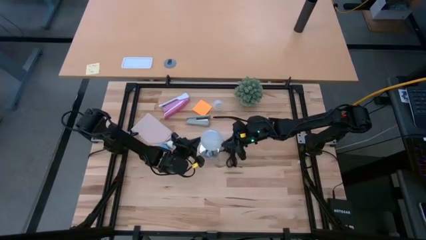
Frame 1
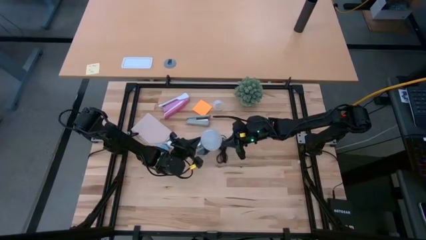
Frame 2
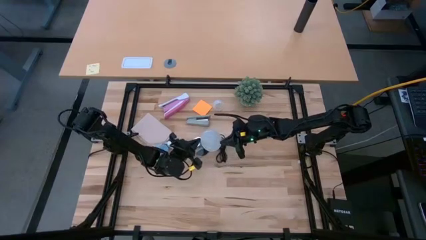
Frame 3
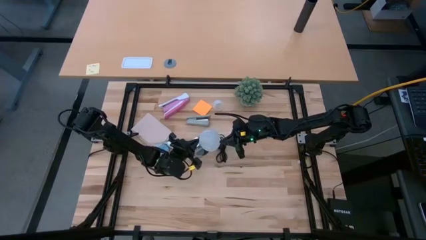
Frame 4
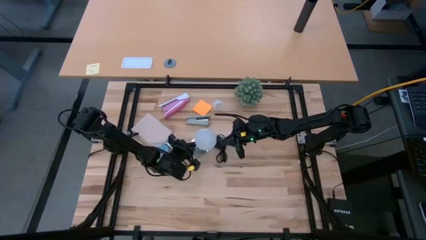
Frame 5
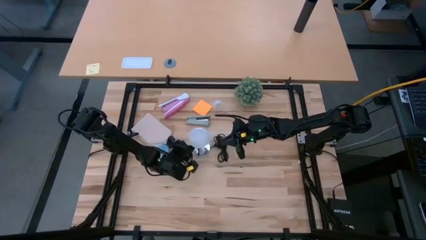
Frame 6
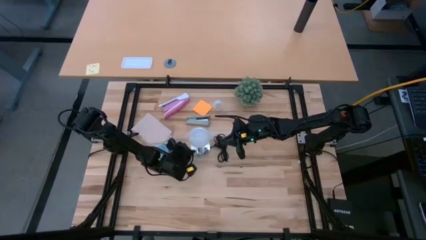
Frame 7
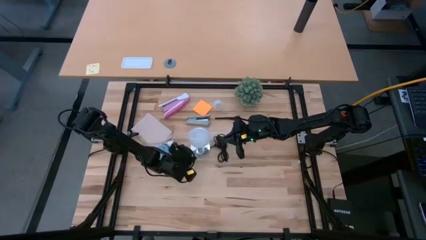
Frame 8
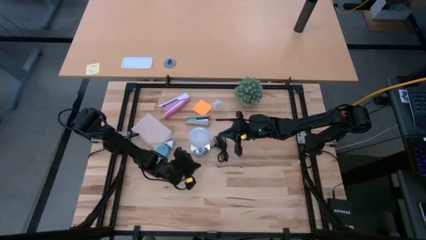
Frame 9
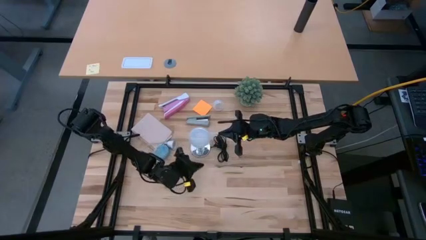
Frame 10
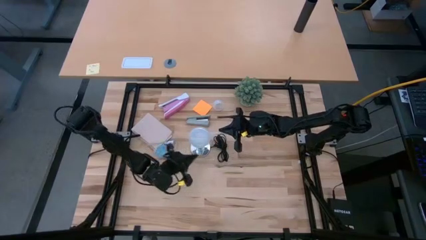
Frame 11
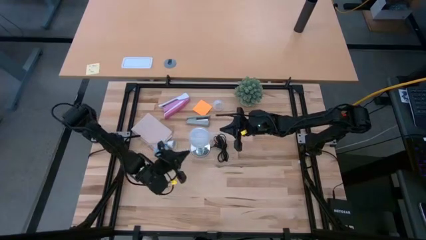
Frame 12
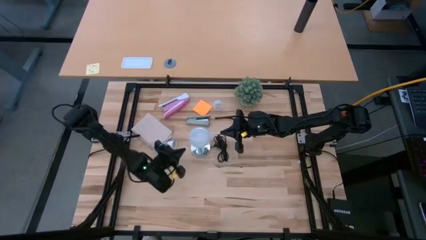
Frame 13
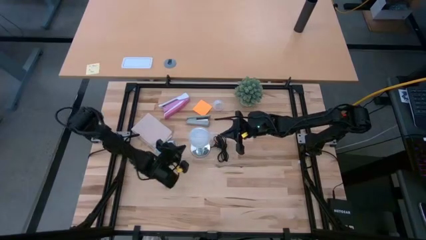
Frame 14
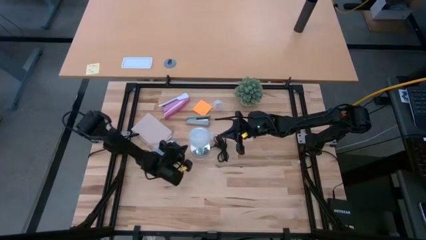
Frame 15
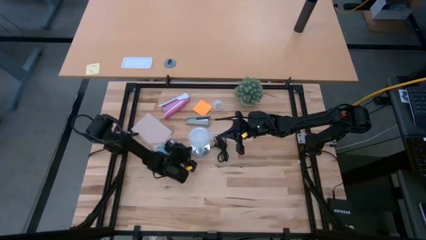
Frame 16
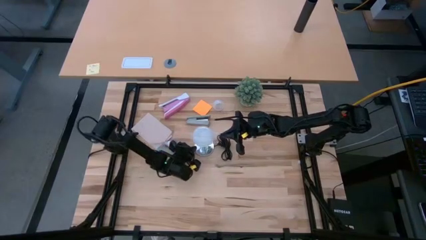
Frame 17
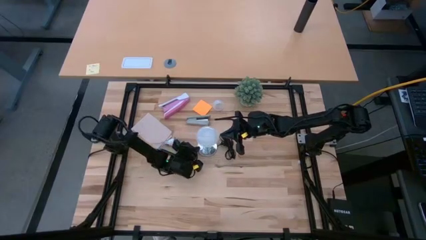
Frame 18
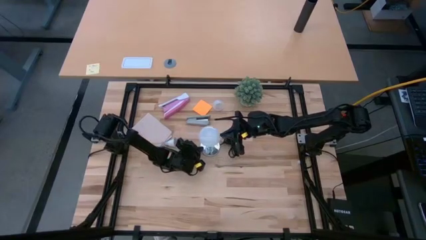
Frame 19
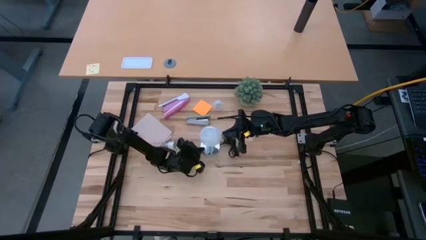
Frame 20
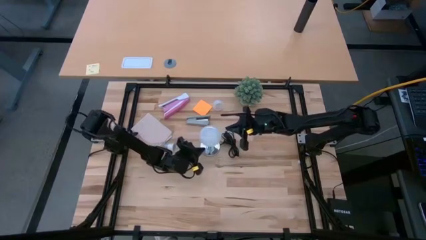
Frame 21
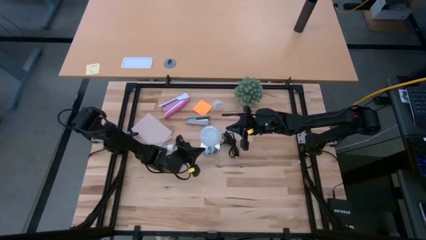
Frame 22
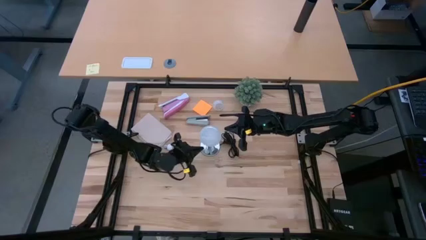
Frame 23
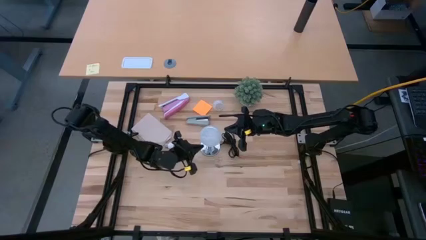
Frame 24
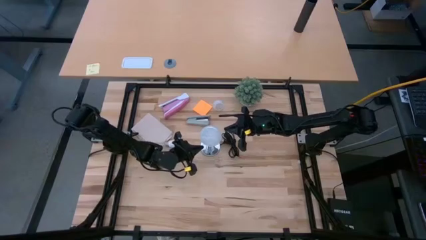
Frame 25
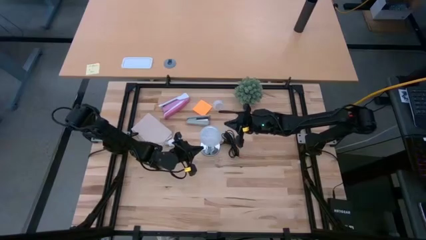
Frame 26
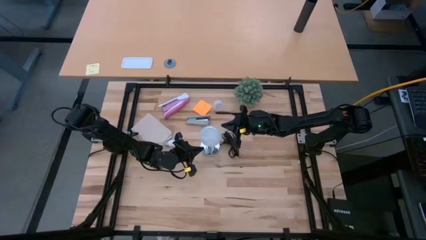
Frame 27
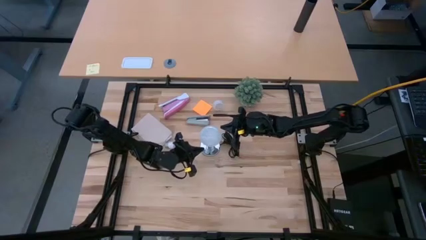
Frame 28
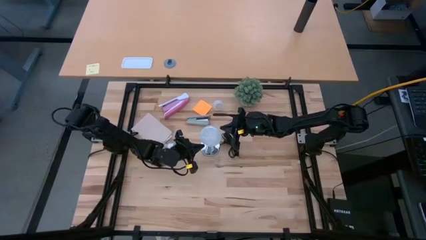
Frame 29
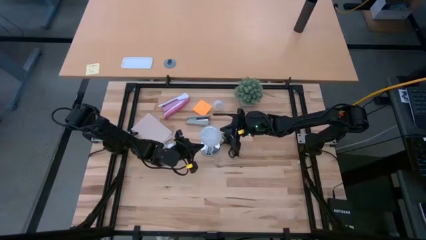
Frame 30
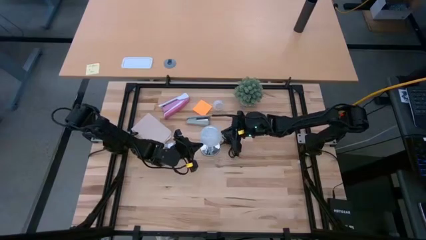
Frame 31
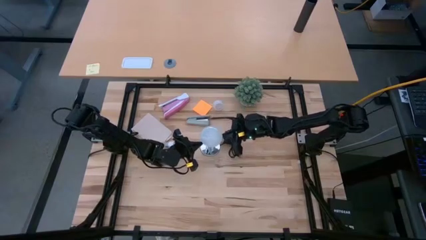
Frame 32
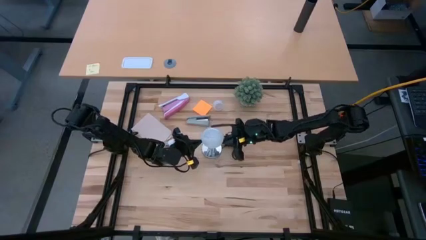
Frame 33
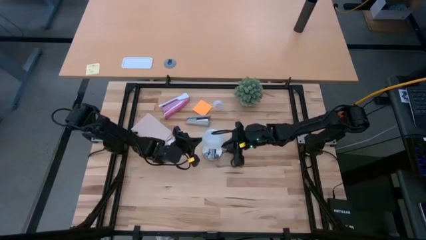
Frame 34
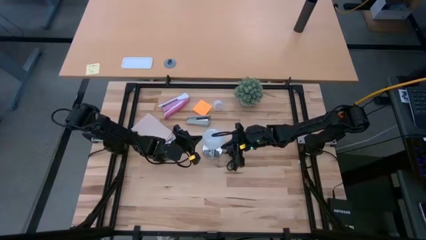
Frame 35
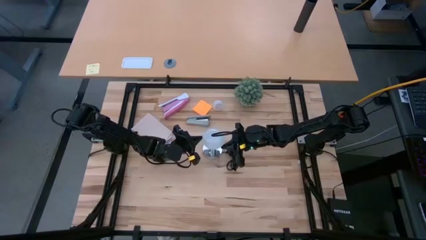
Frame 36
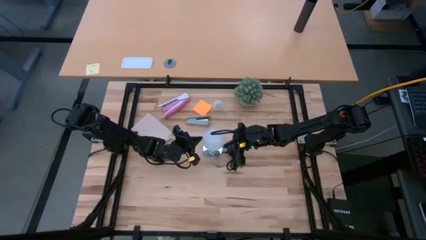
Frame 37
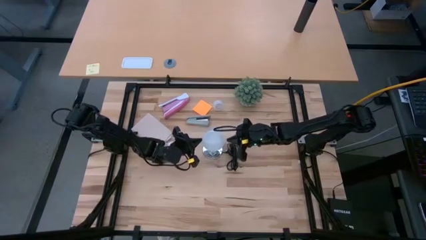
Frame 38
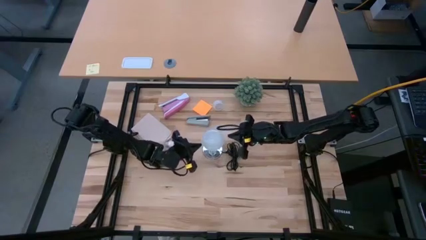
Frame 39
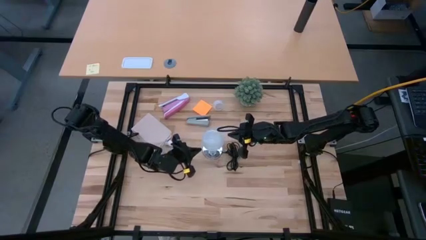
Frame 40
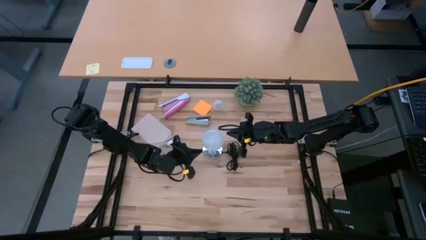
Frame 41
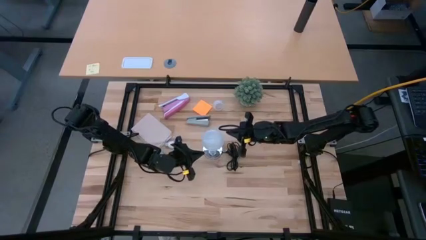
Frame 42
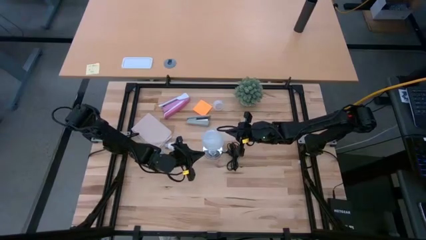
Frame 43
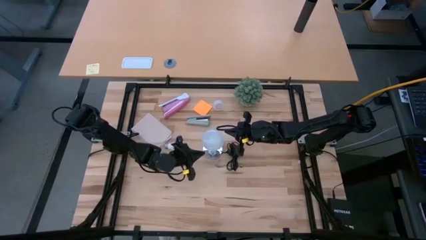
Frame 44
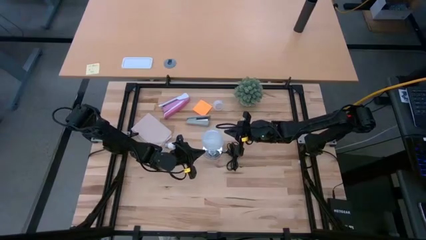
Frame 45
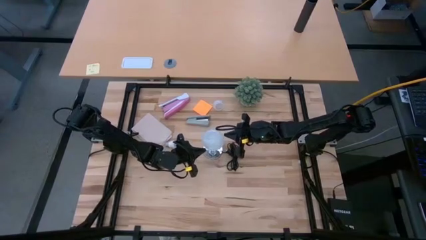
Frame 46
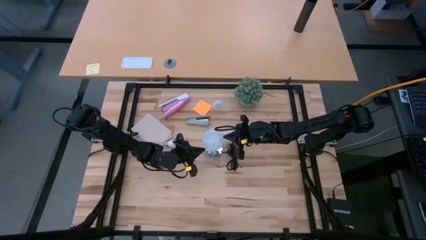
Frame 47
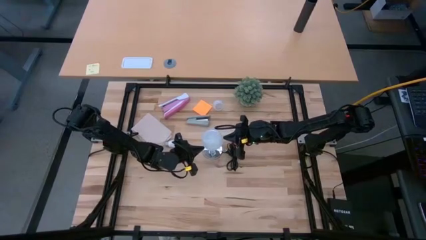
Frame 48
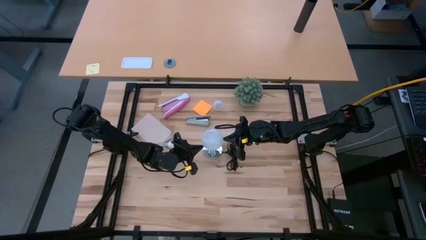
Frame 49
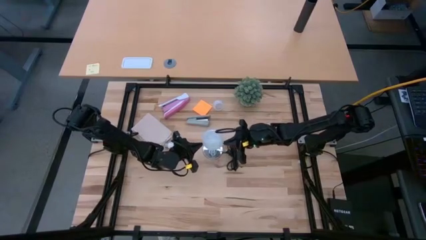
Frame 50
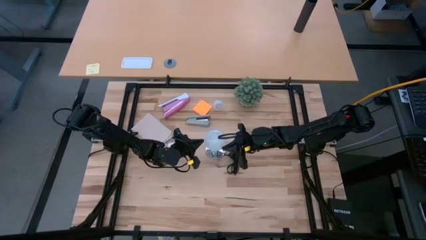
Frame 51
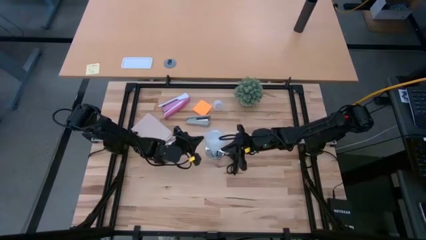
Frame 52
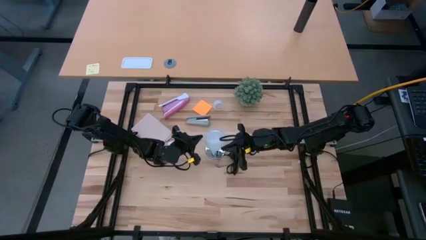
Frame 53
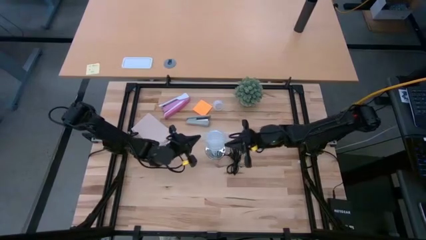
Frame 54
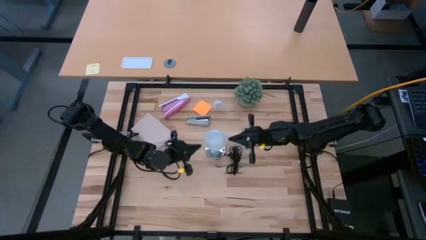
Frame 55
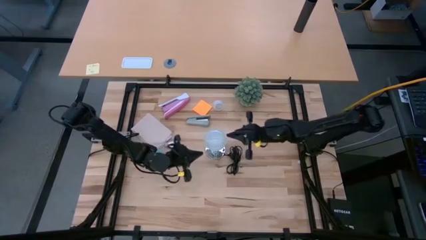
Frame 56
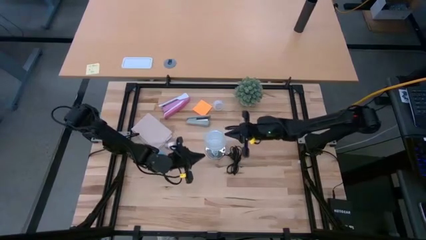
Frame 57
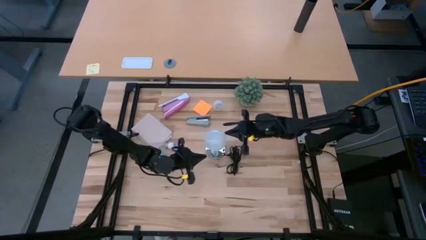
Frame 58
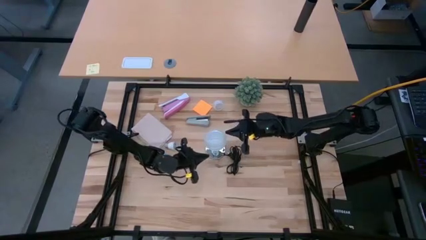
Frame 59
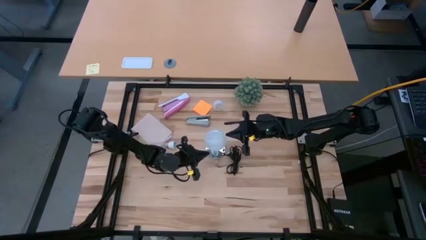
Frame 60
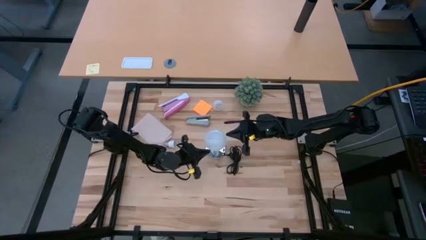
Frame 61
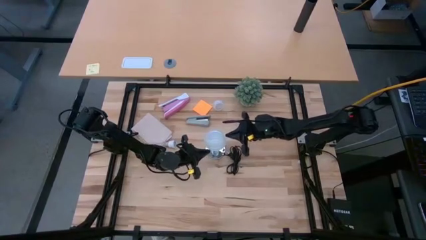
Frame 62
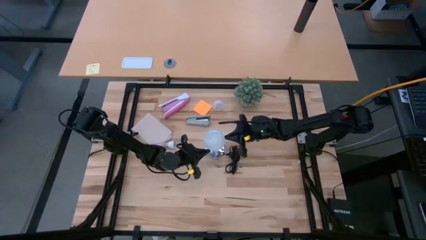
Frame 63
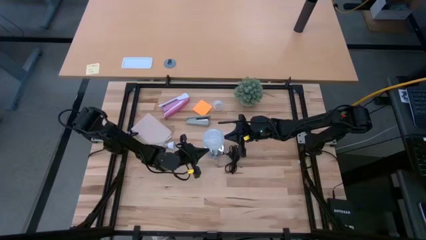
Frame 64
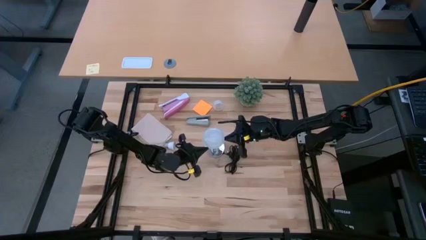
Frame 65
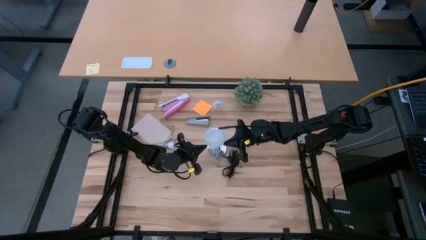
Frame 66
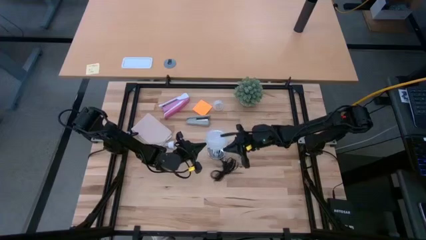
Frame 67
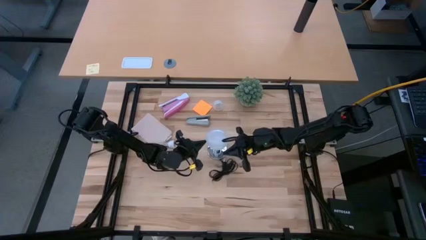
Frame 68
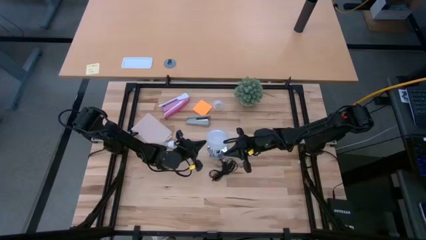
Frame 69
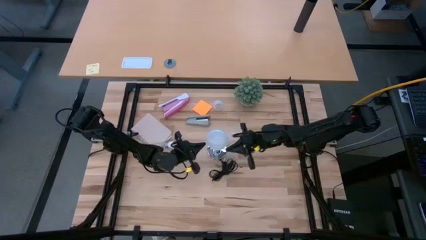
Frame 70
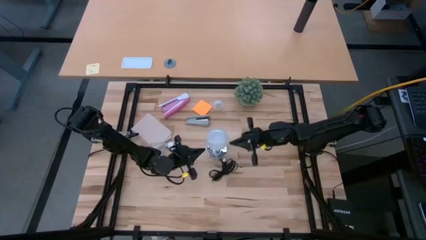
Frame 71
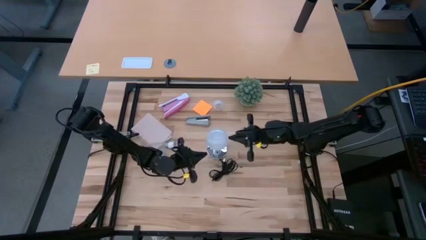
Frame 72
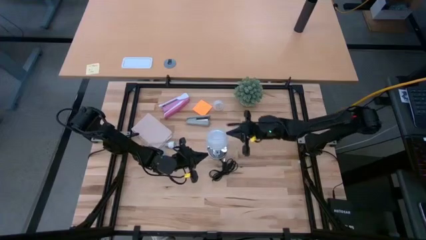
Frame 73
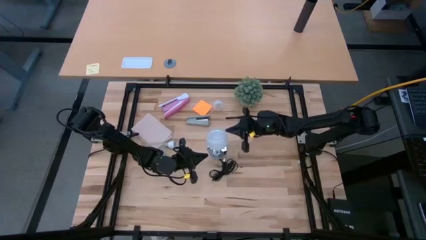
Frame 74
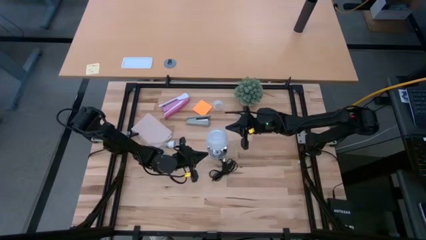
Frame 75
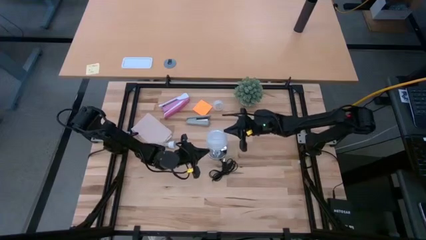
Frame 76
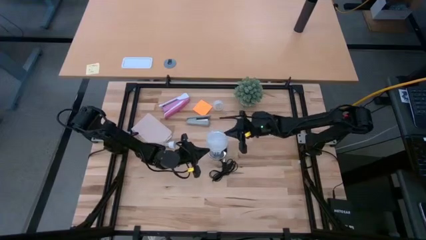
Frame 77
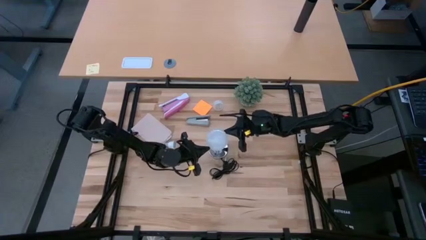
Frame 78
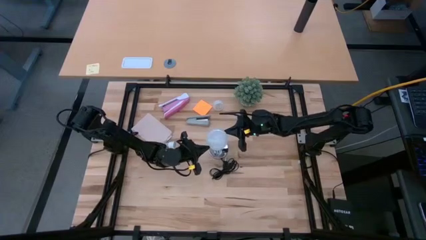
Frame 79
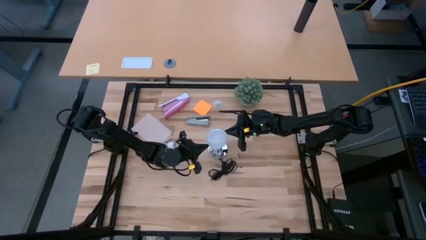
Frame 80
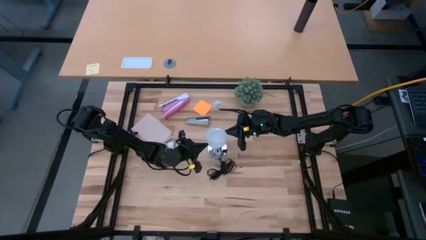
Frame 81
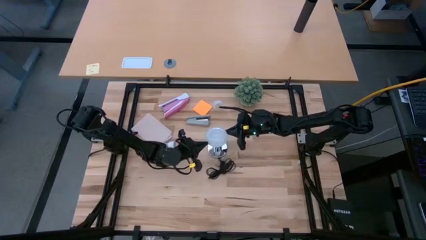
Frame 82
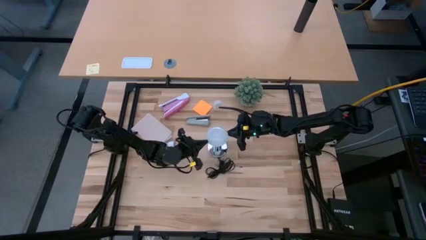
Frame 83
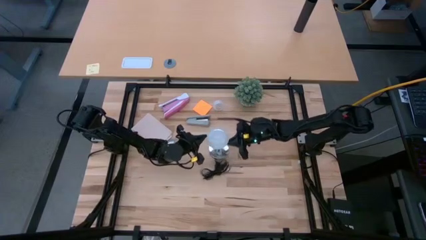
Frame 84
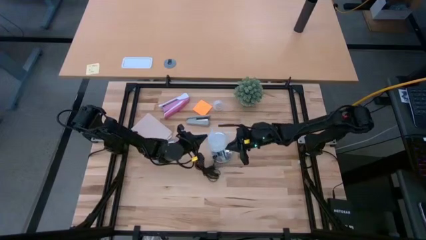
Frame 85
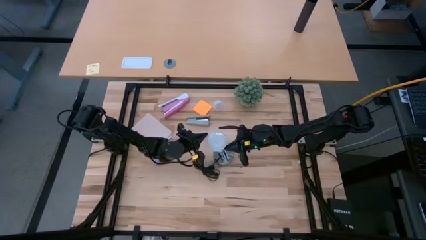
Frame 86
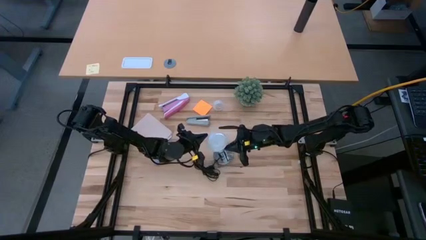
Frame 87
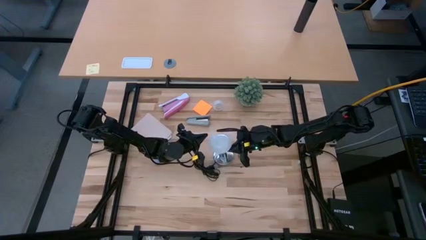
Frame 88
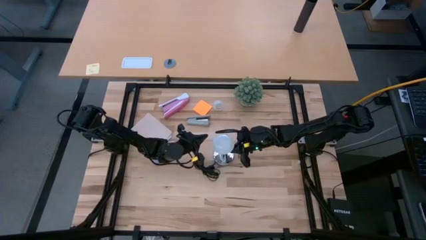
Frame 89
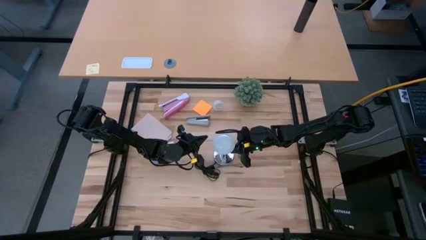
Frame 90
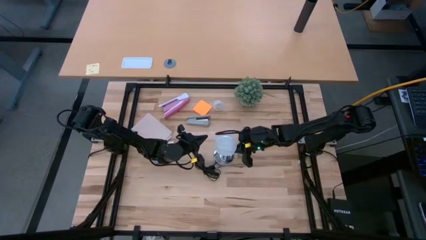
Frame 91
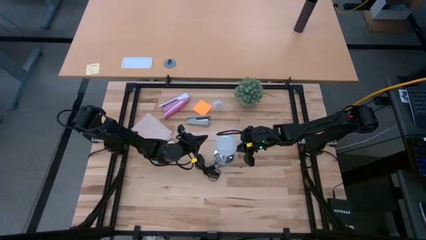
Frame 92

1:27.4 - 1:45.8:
Task: Screw lightbulb
Insert the lightbulb on the lamp
